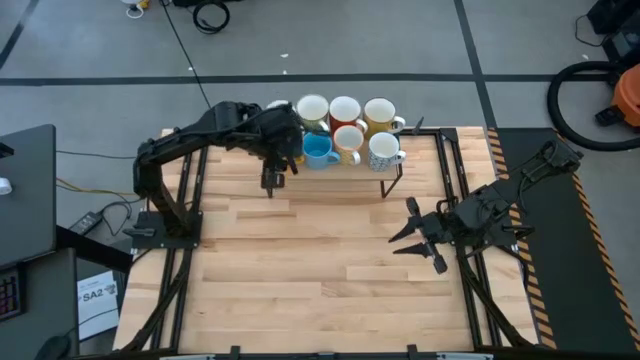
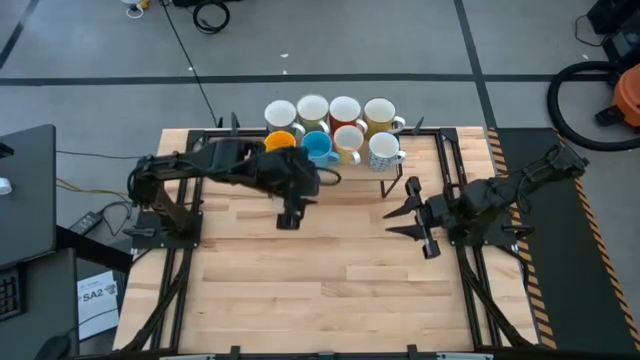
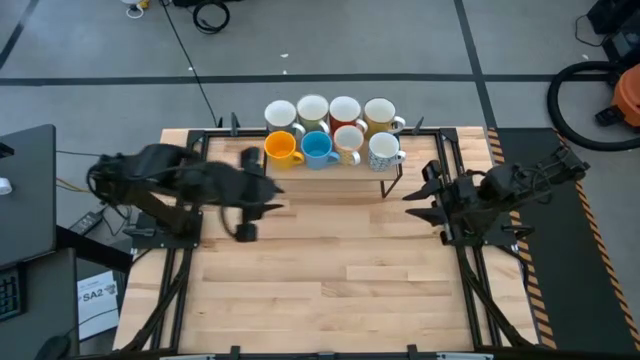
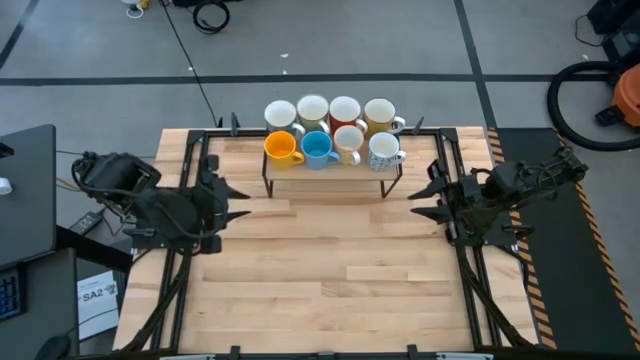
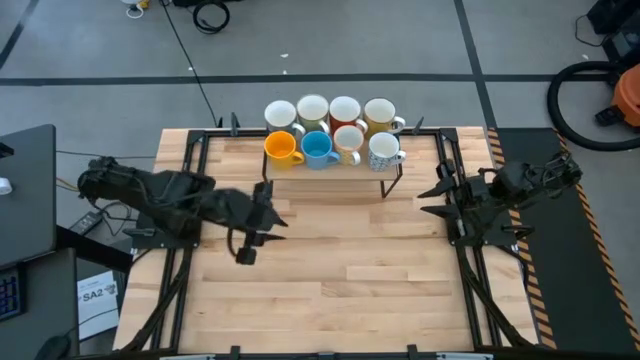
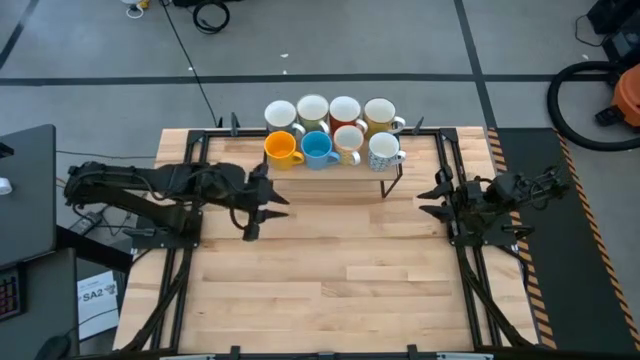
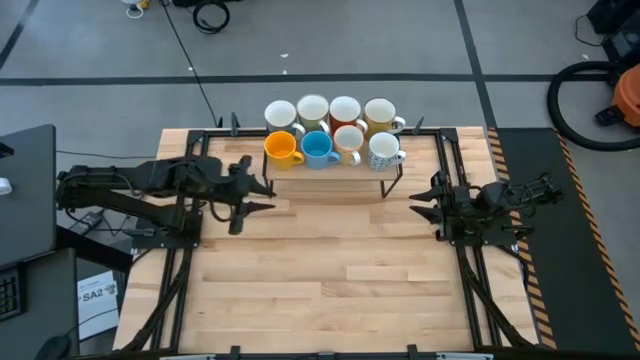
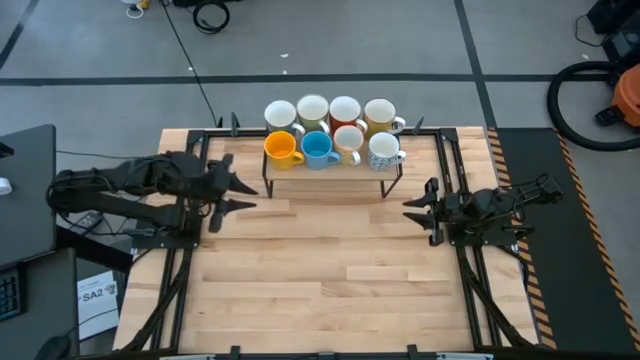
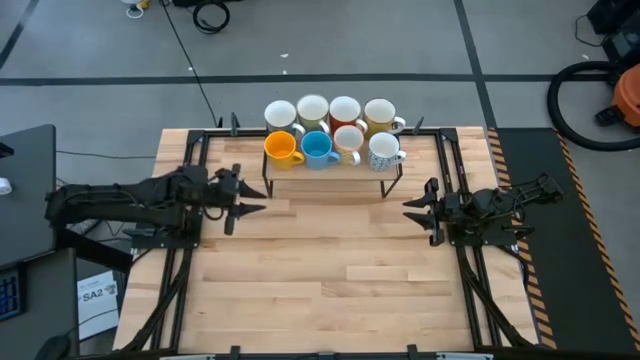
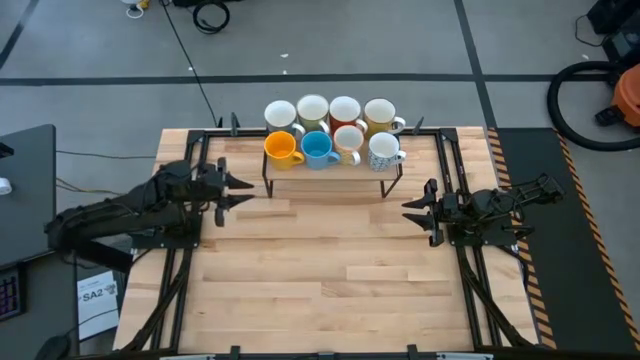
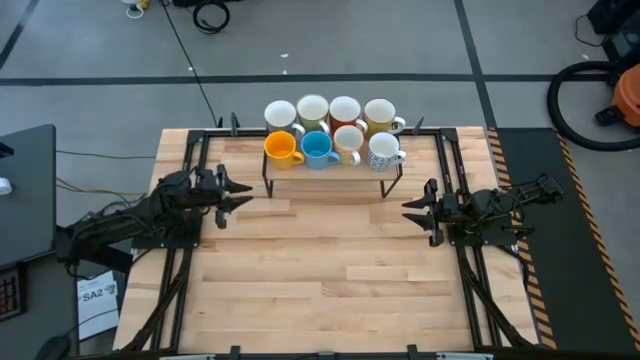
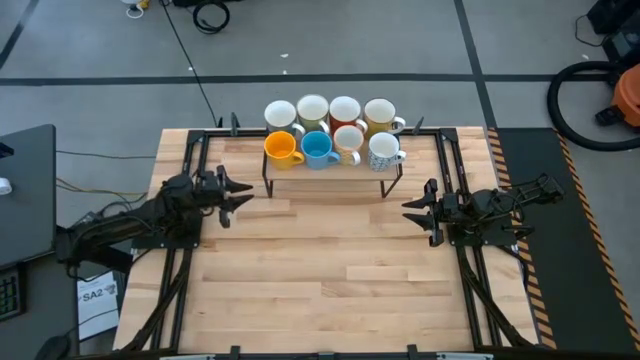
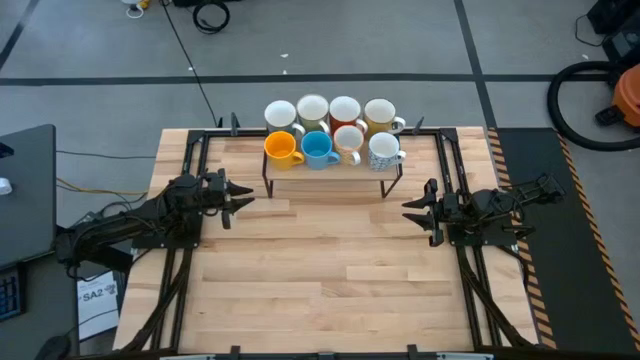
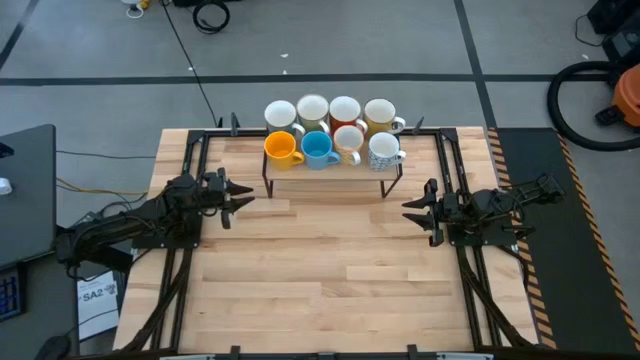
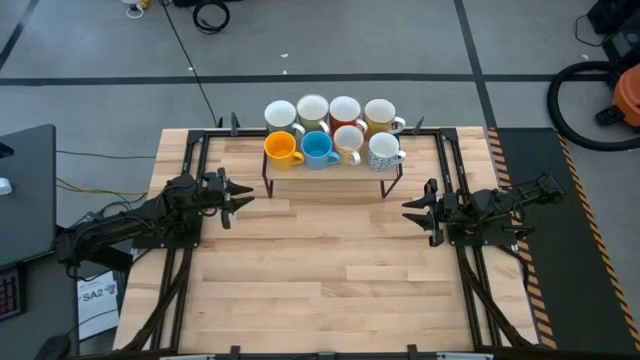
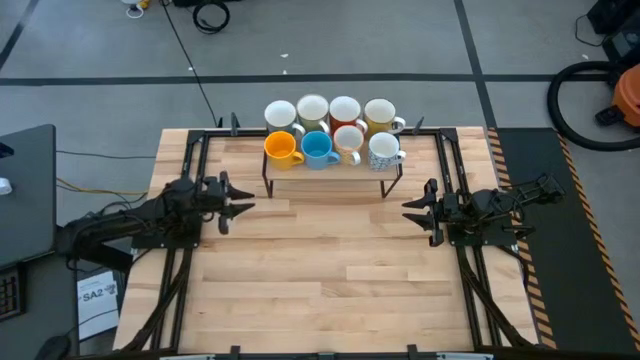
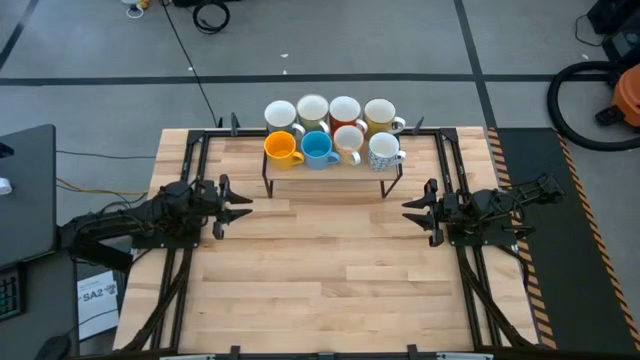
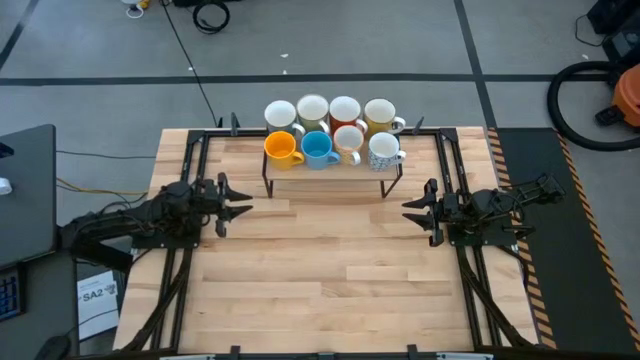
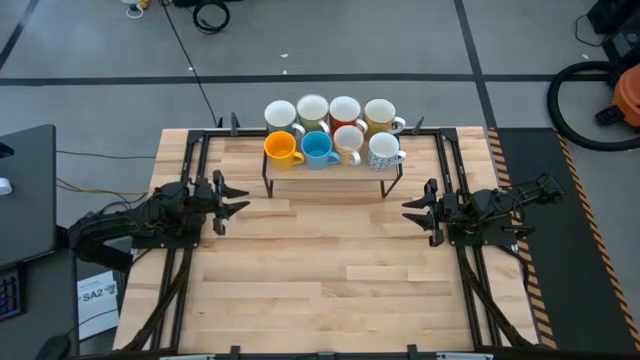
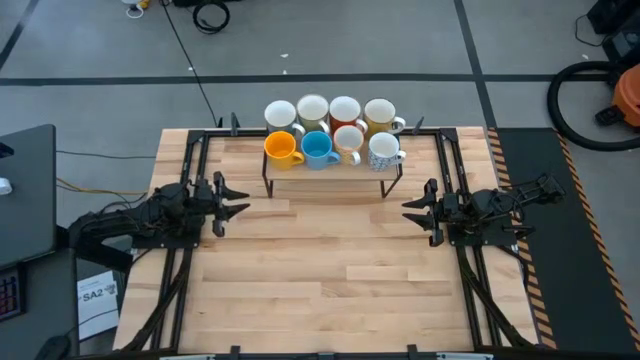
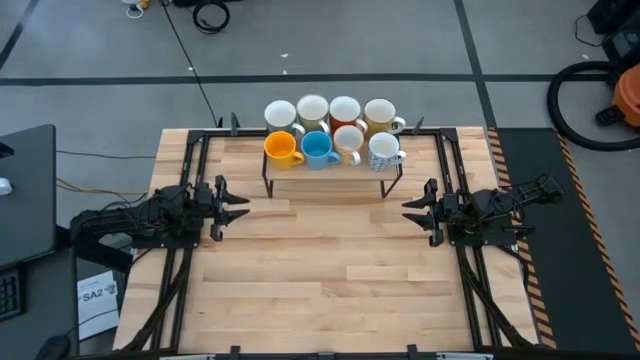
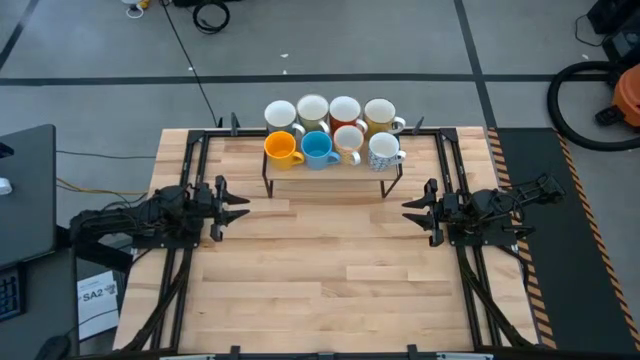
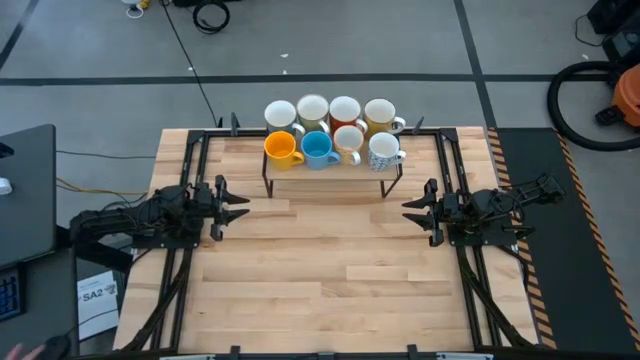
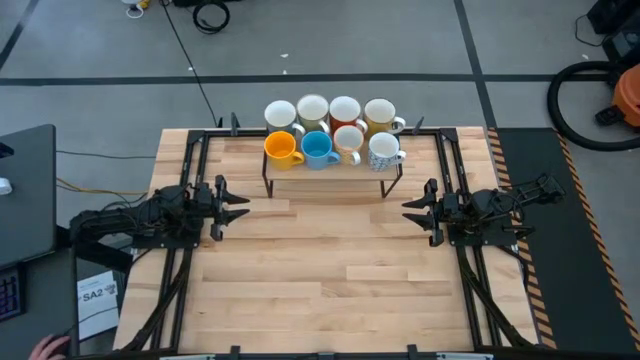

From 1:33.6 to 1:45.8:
Task: Place coffee mugs
Return to Home Position

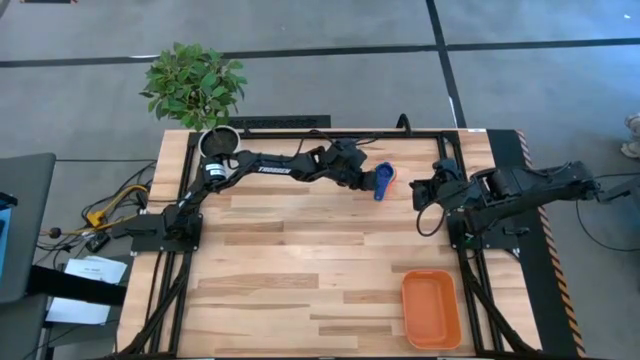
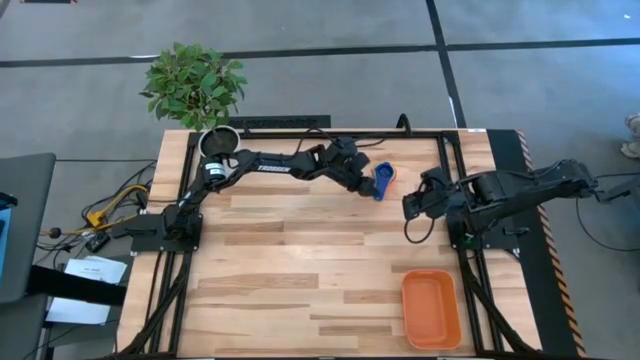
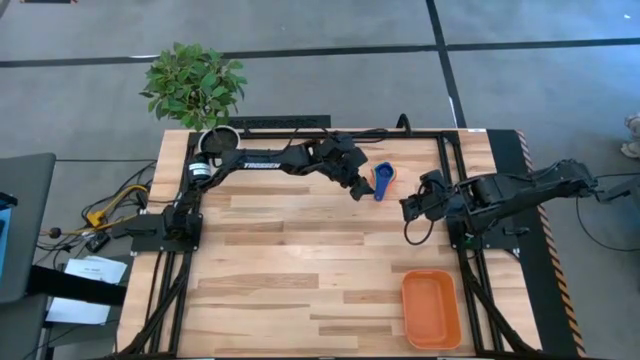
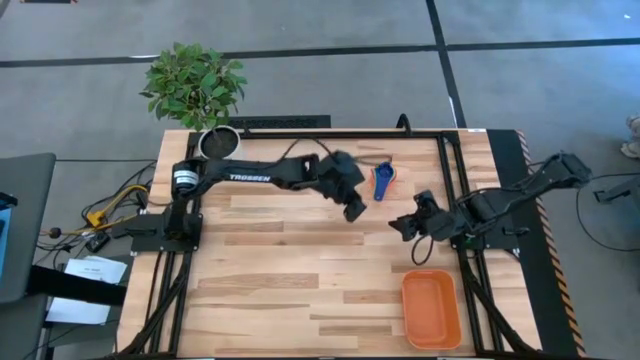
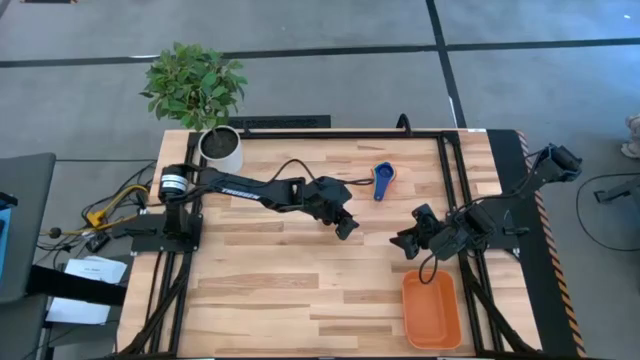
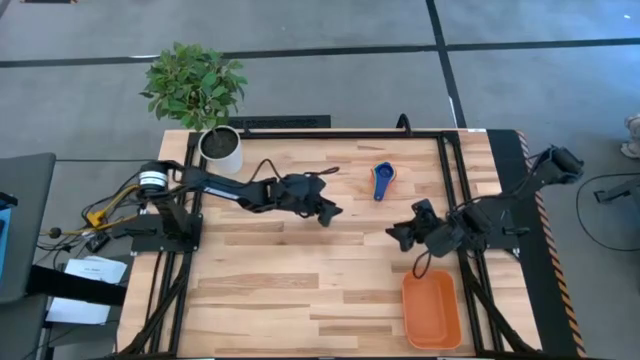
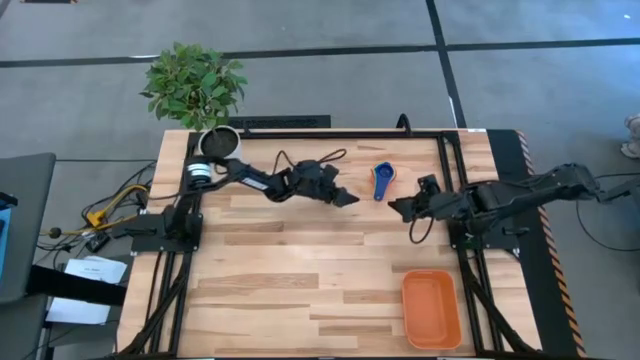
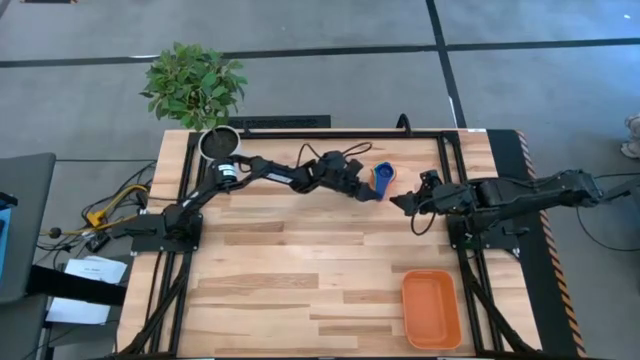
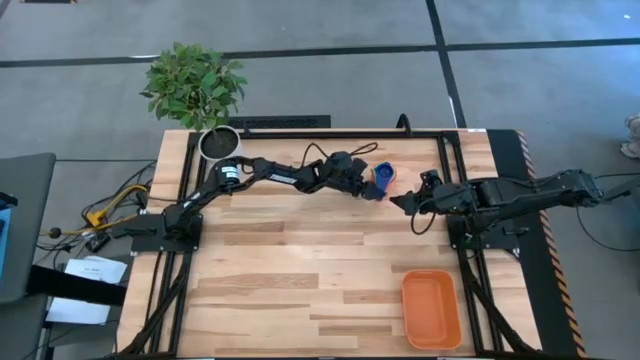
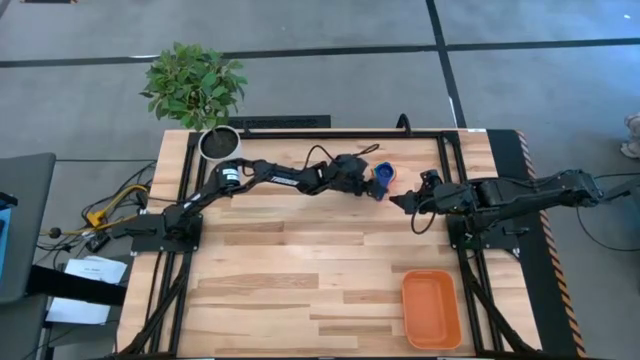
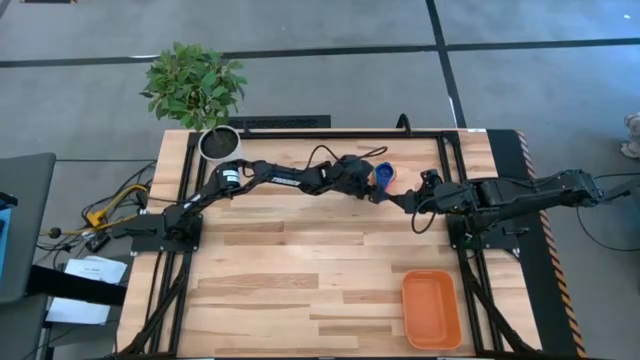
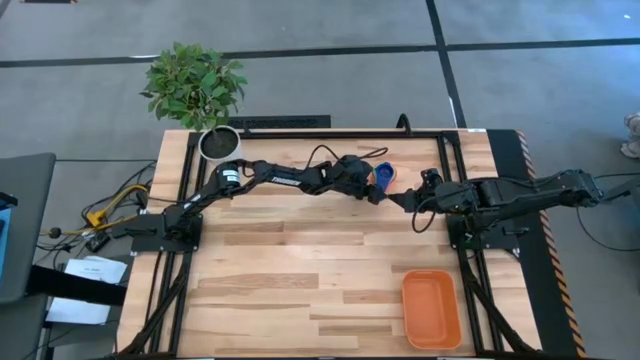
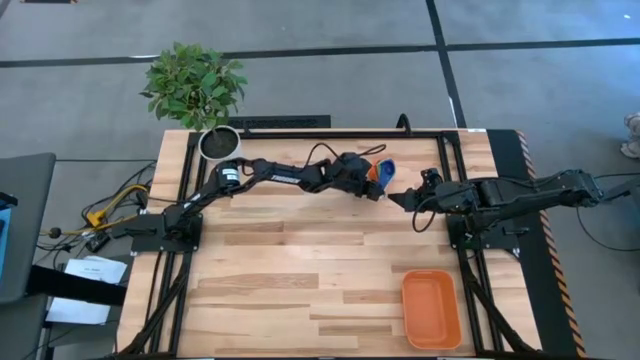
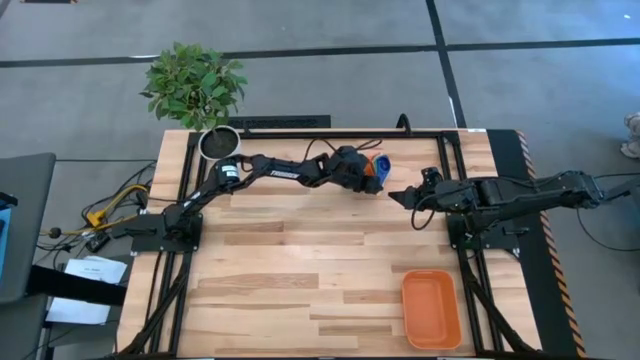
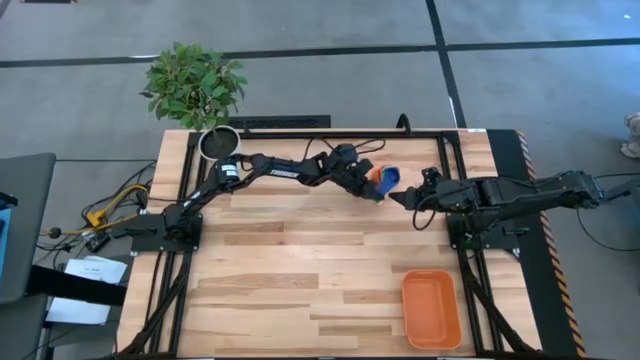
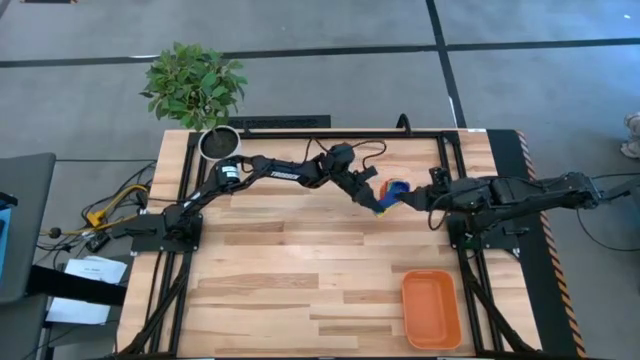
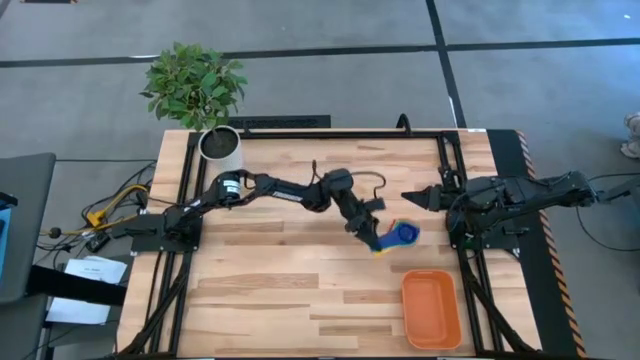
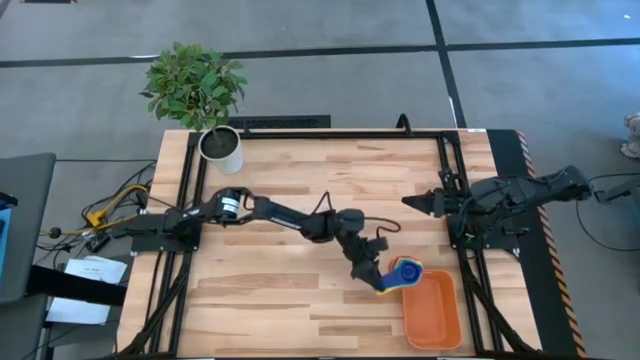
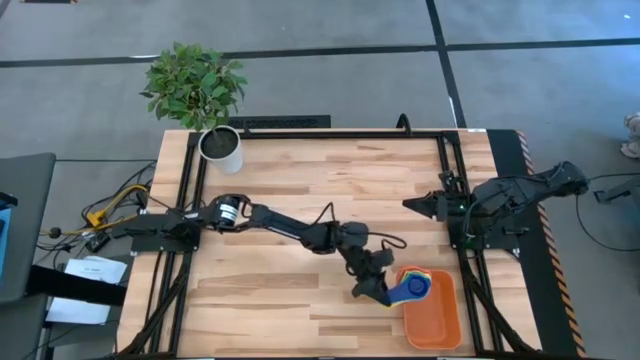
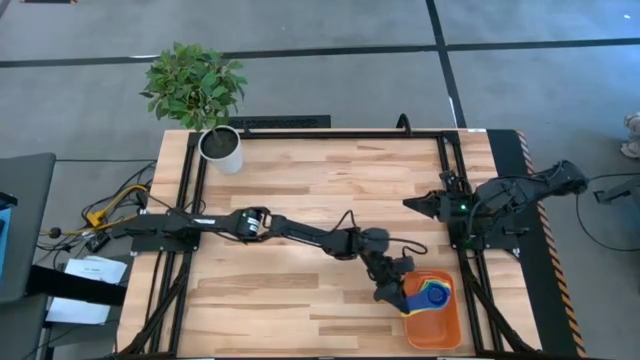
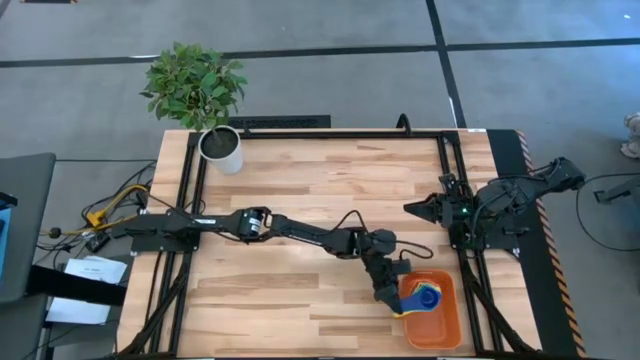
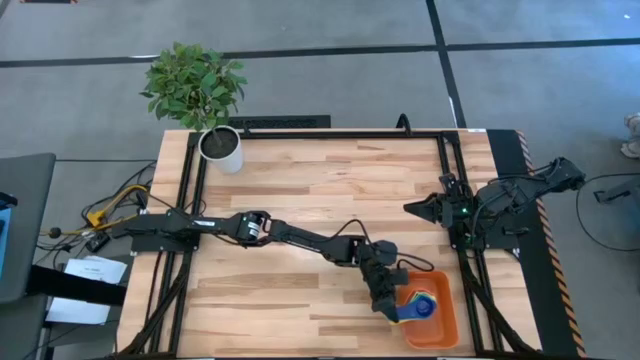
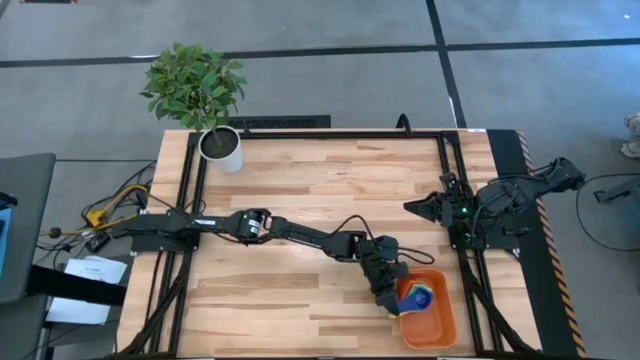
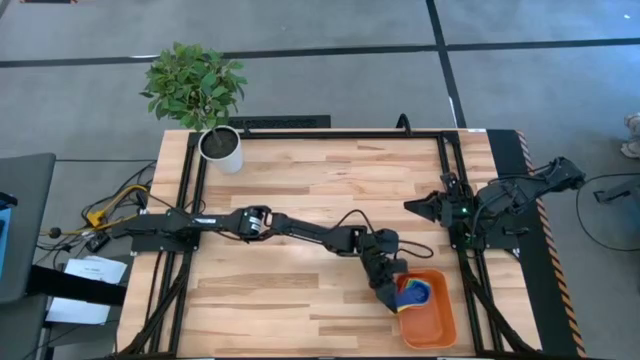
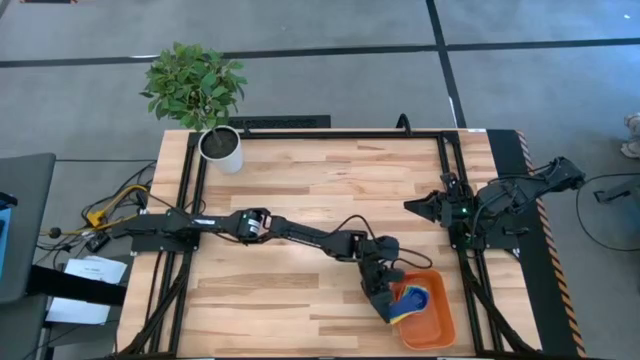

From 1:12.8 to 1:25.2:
Task: Nest measuring cups in basket
Put the stacked measuring cups into the orange bin
